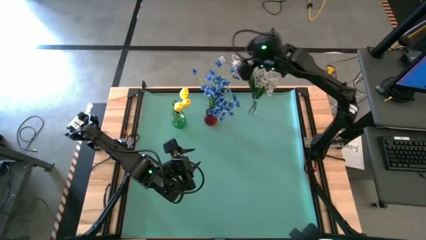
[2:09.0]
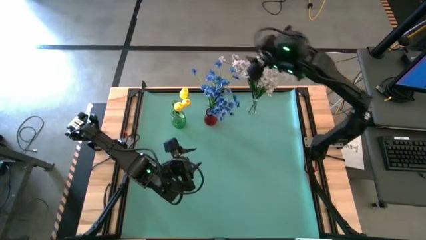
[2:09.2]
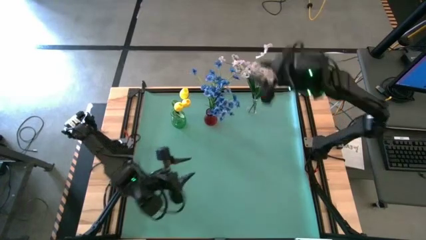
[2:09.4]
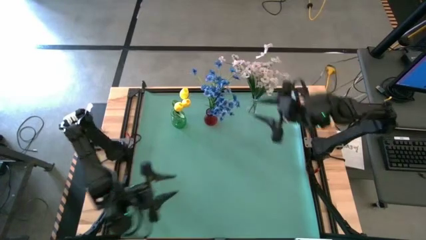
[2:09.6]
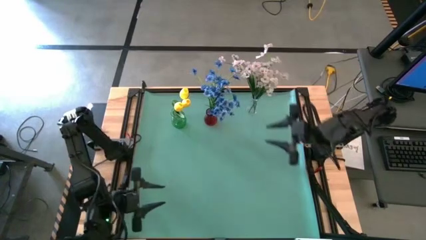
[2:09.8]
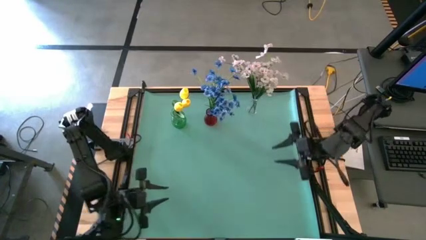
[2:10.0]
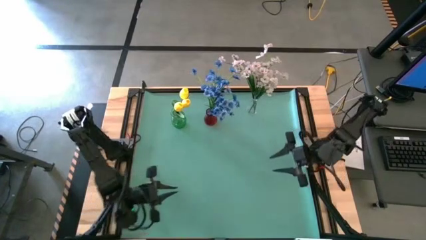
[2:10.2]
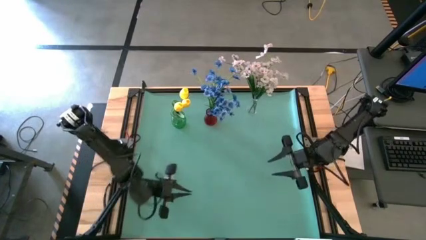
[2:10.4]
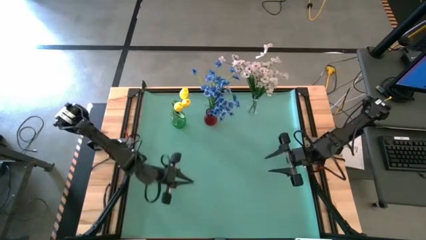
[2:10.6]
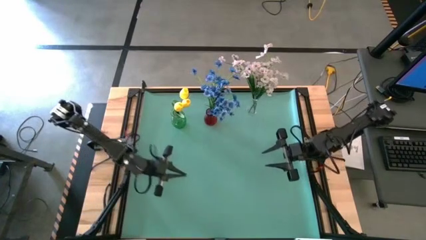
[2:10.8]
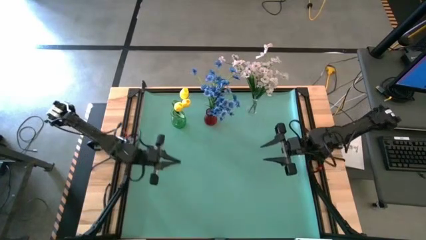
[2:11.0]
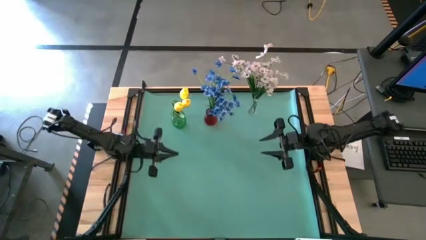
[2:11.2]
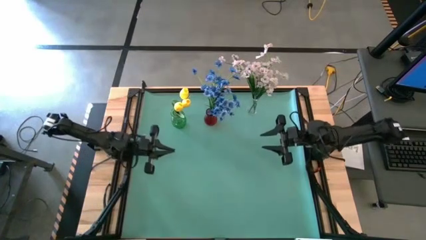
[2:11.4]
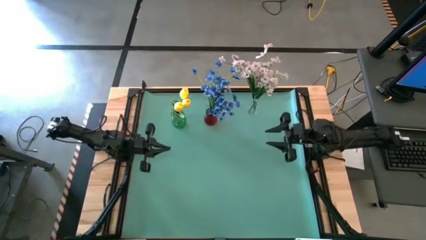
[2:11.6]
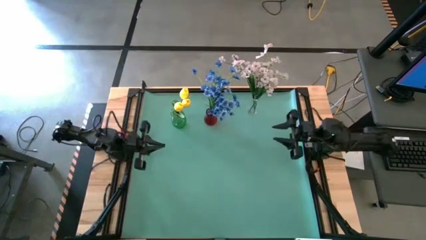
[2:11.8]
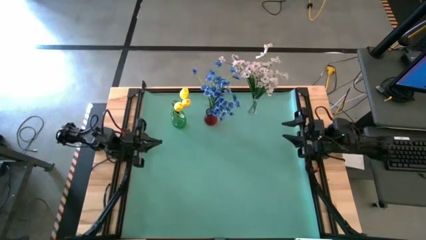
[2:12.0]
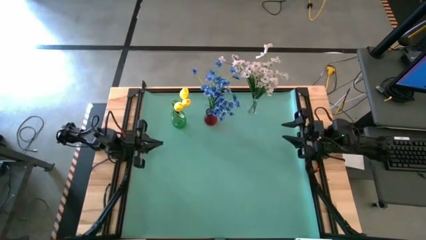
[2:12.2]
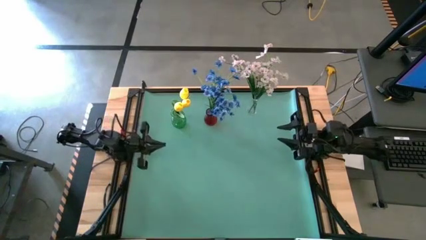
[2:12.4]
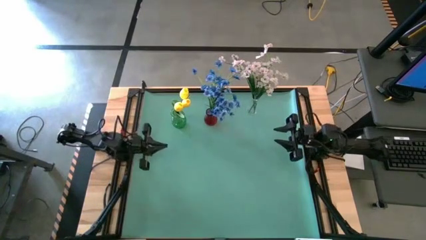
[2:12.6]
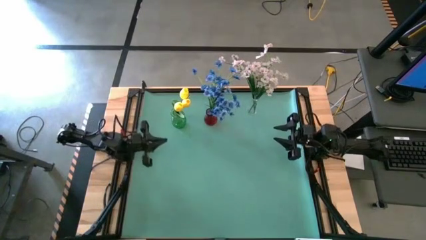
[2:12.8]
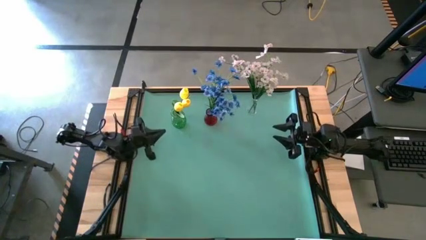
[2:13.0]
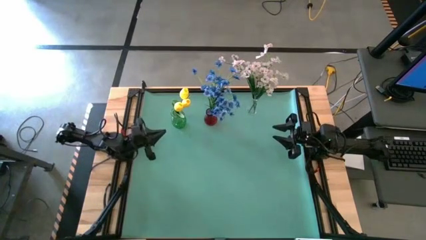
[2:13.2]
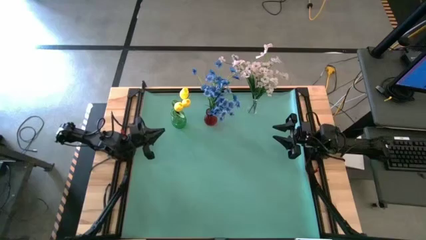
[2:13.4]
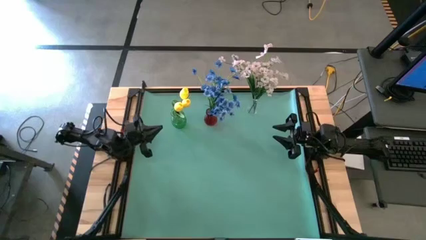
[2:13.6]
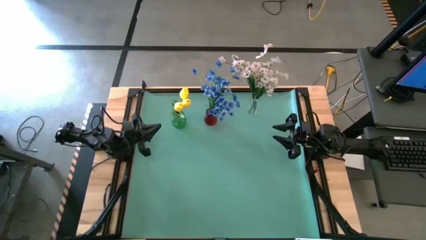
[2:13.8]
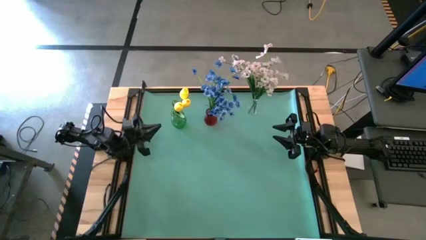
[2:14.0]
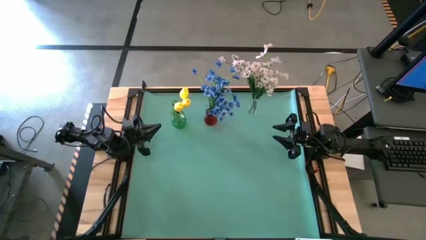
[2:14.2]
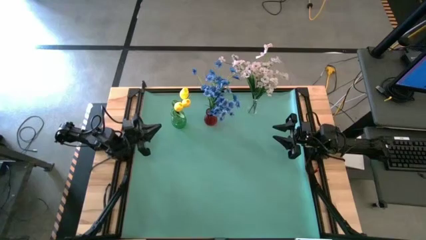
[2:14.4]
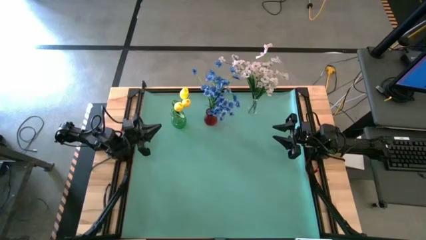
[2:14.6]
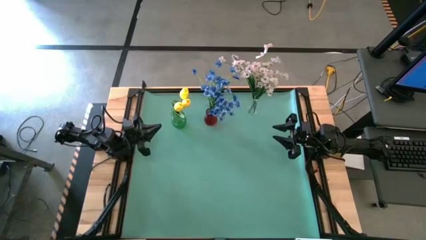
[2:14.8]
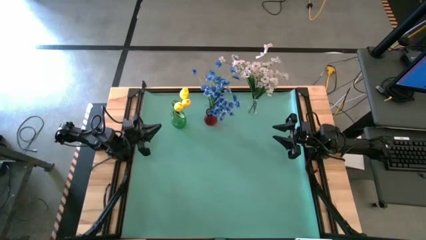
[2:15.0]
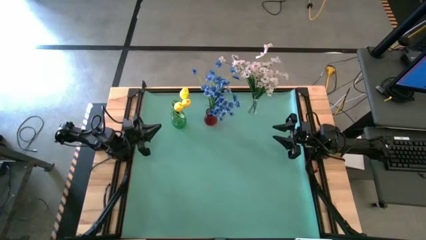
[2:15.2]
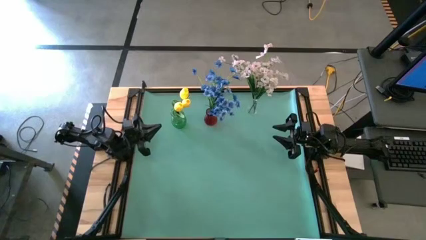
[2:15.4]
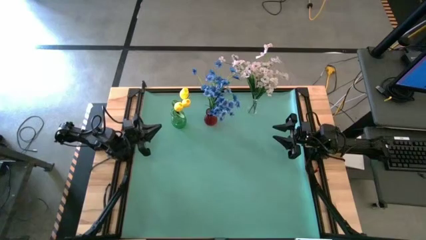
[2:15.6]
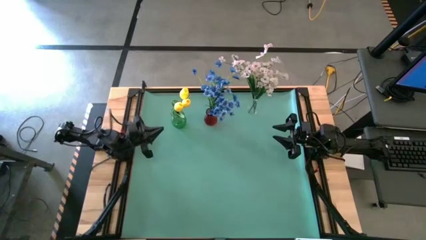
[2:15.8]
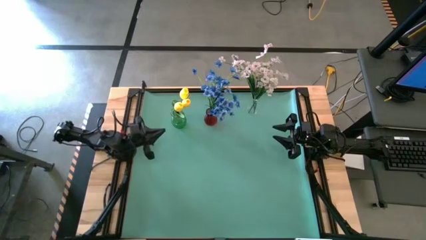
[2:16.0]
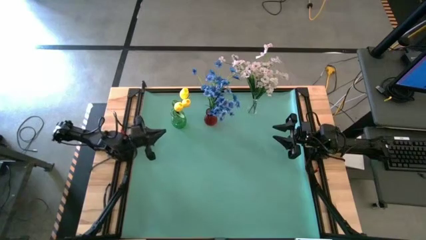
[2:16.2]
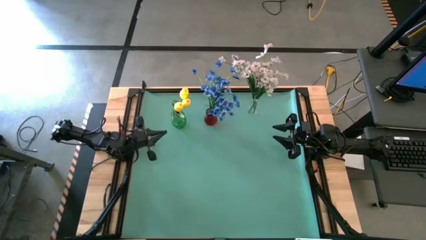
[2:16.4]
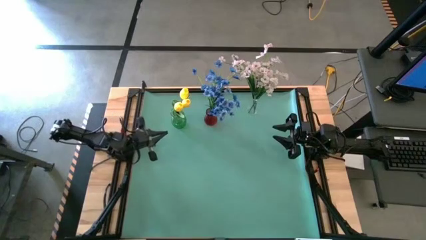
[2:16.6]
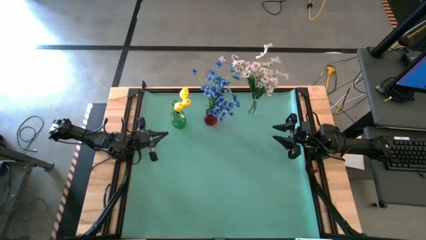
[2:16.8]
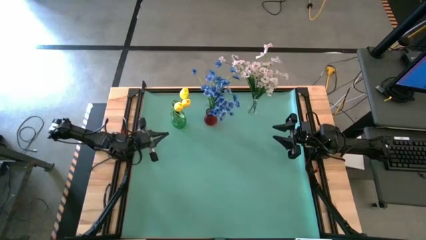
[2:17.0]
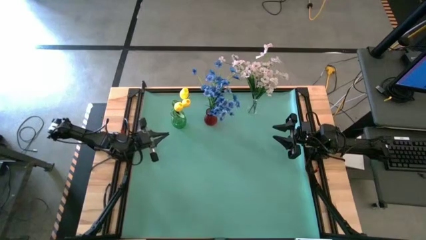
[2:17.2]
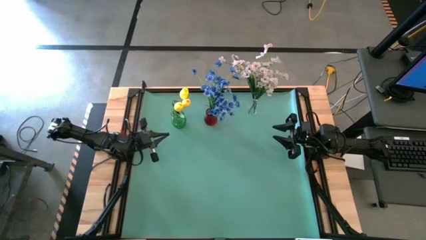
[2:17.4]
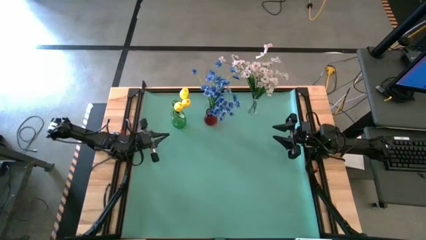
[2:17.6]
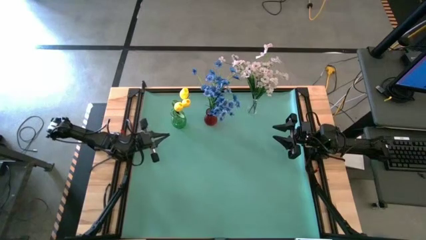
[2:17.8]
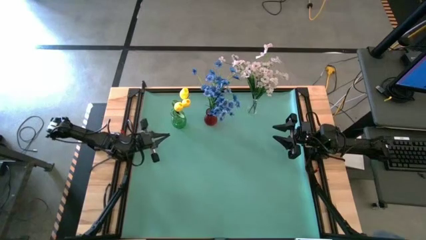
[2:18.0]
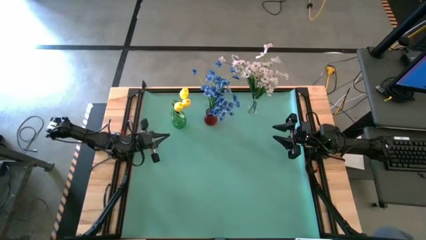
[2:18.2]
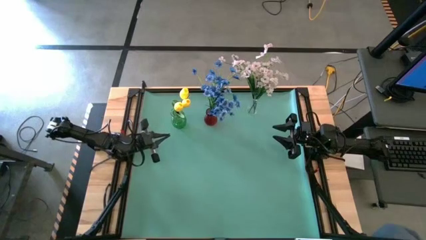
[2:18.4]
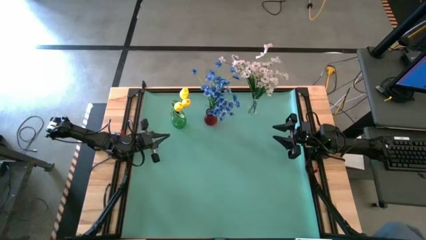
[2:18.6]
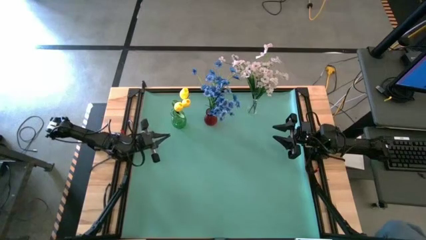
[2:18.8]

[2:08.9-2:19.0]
Task: Sort flowers into vase by color
Return to Home Position

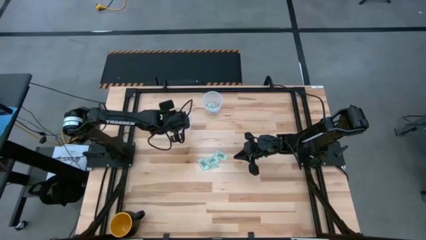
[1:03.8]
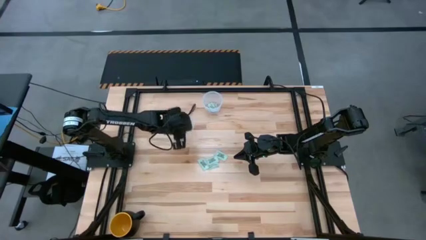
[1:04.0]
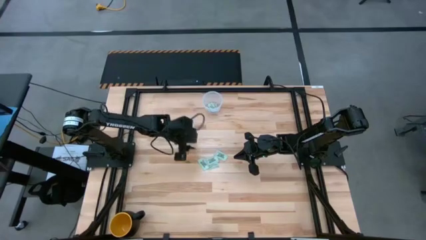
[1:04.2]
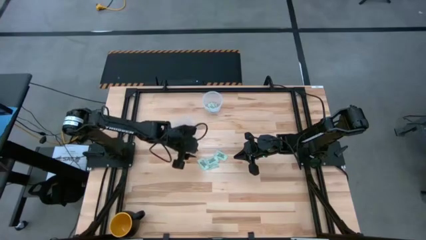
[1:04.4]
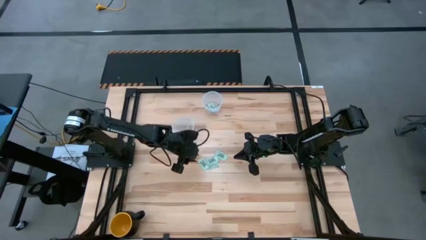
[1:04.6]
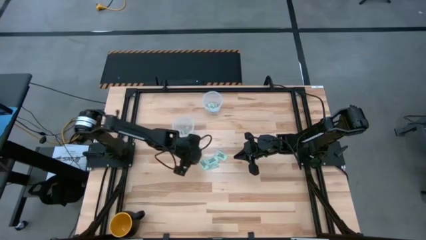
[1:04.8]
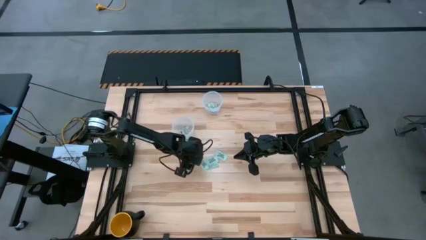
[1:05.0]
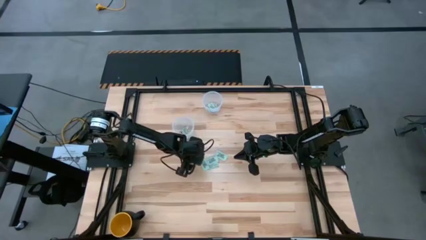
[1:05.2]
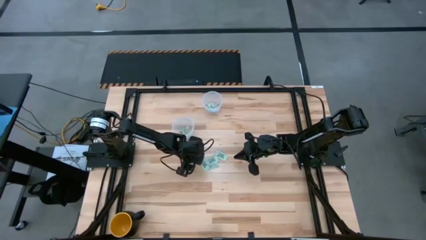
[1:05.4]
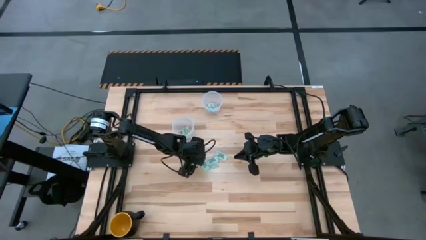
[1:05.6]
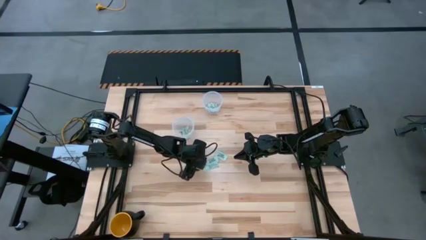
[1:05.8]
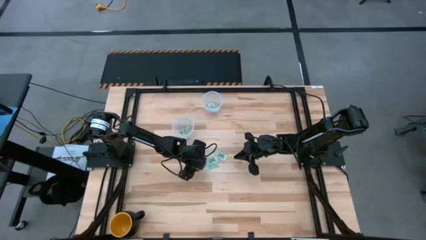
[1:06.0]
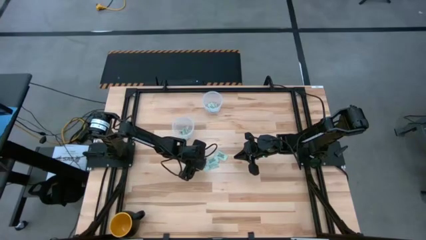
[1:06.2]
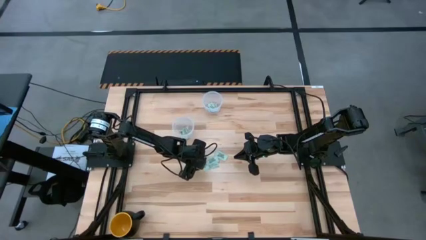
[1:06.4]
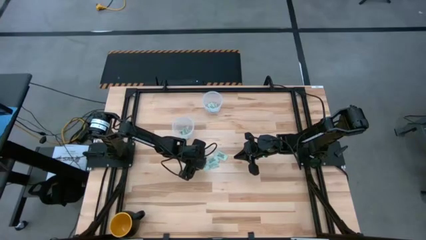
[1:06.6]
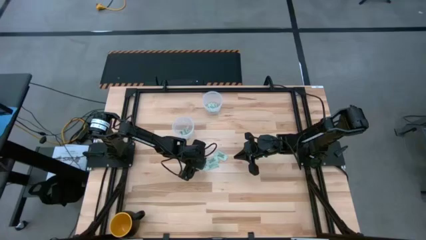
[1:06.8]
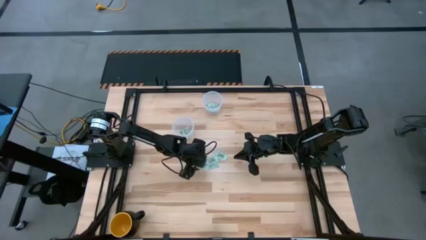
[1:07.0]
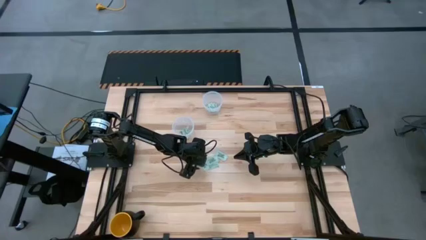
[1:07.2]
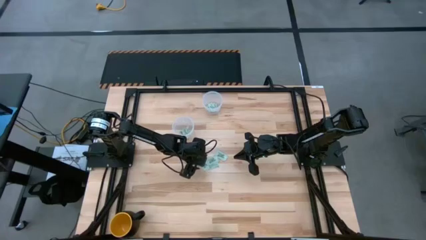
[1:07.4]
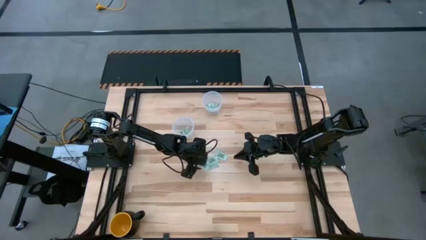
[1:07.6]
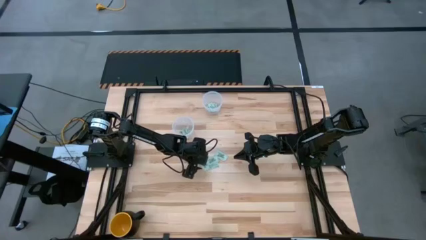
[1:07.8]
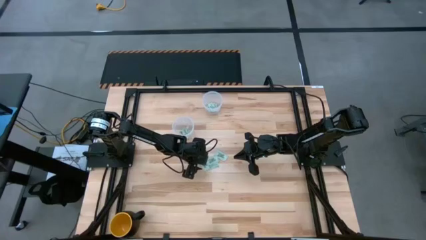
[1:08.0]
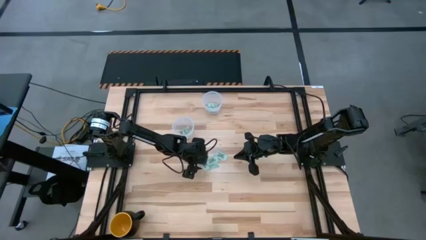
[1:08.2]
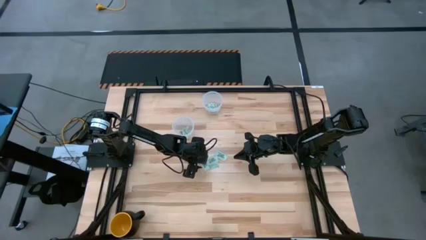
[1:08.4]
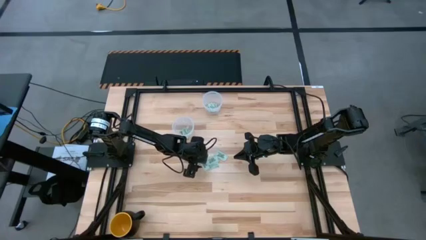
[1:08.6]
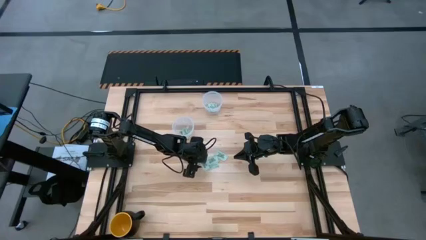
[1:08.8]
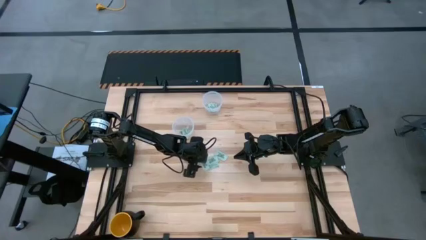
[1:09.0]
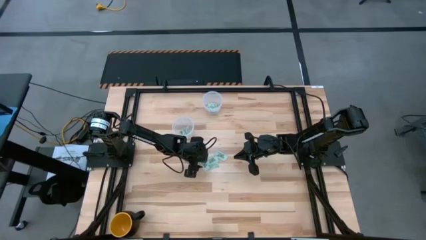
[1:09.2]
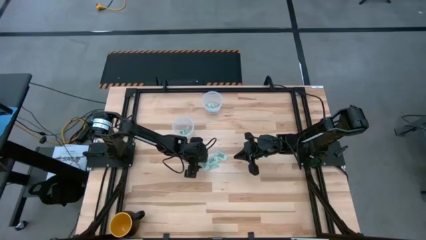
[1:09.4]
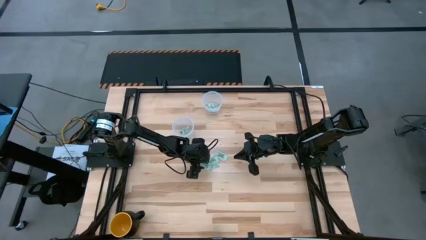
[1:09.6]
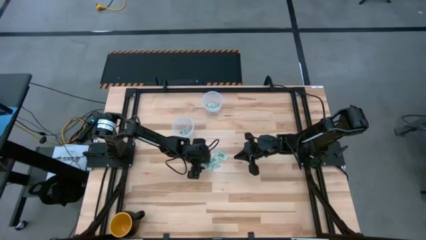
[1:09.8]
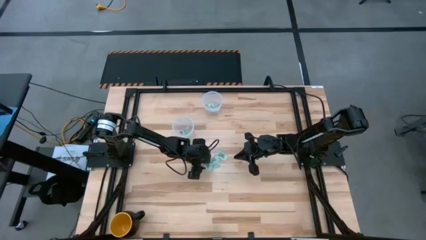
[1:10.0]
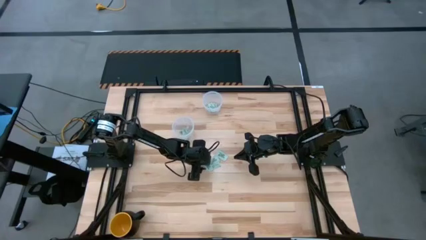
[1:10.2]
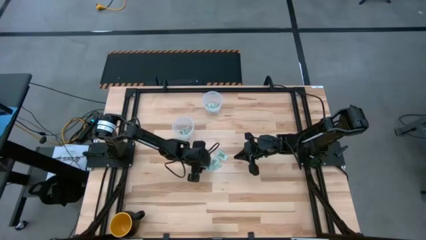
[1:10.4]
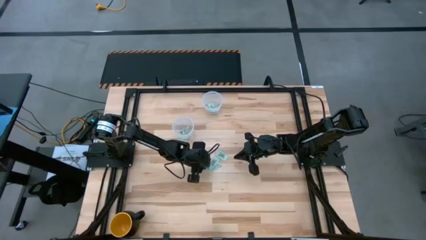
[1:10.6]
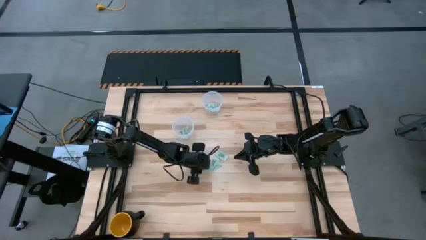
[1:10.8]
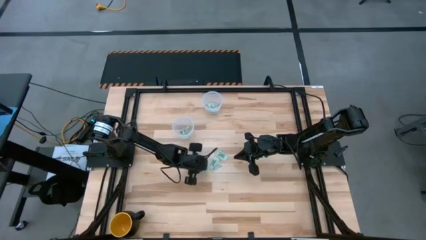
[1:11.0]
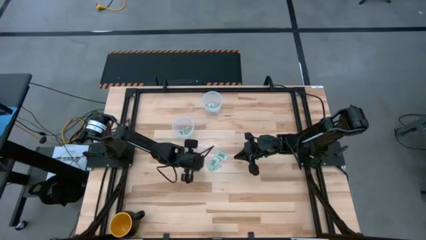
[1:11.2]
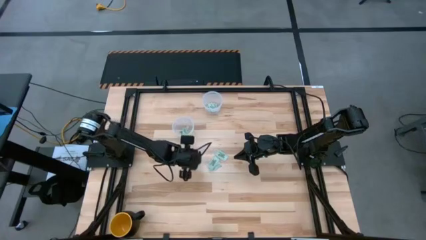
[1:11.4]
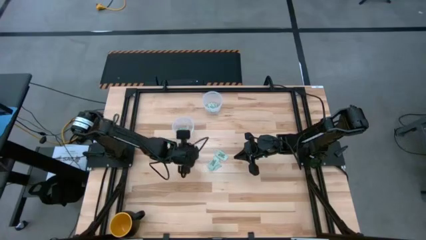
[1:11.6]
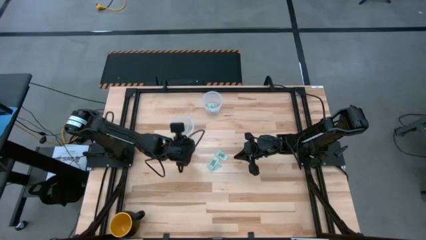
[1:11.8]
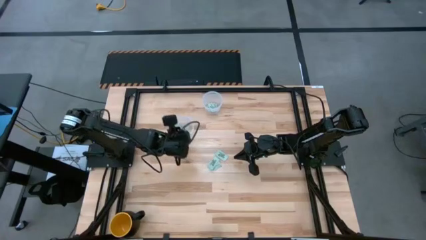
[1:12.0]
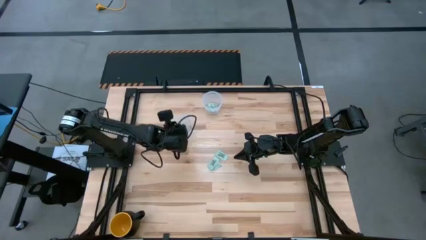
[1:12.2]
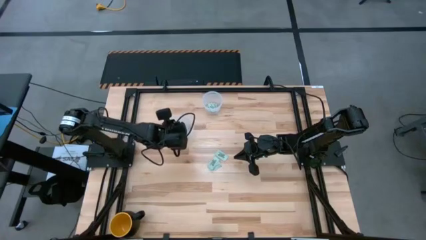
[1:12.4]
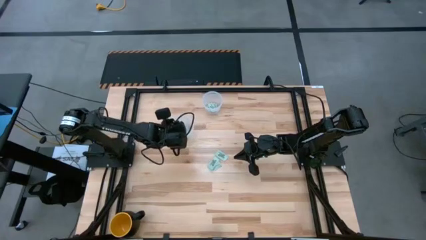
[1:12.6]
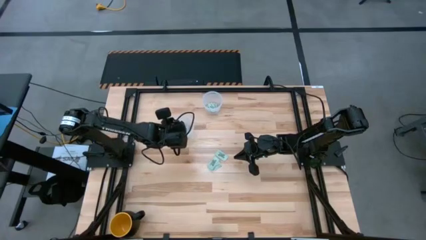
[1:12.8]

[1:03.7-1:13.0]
Task: Pick and place items into bin
Put the stevia packet into the bottom transparent bin
